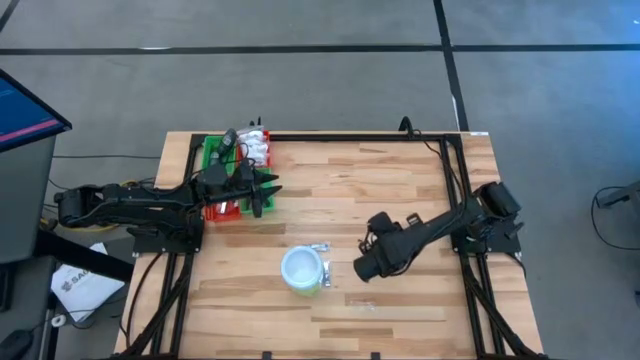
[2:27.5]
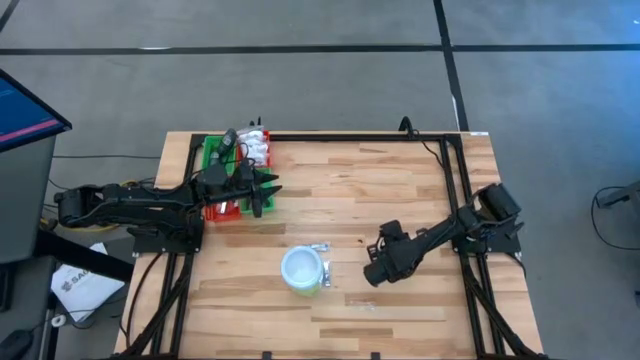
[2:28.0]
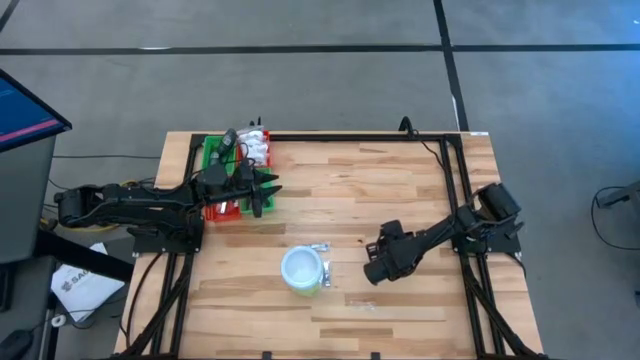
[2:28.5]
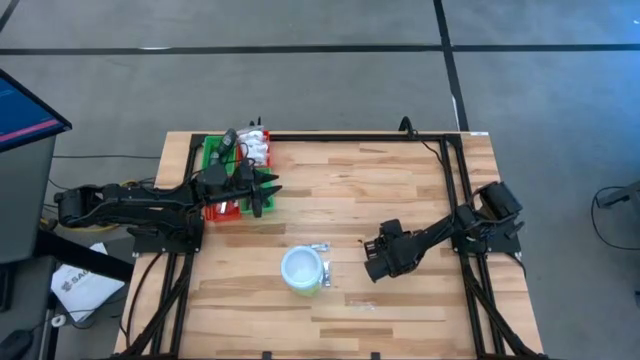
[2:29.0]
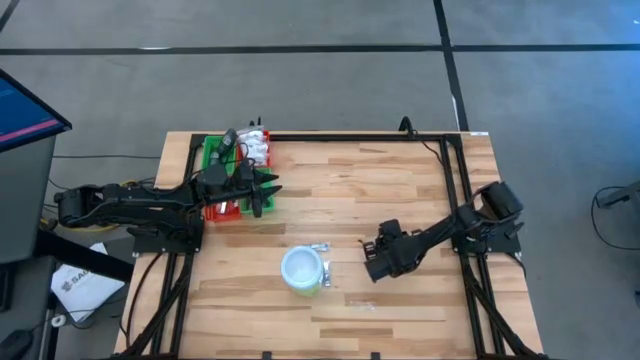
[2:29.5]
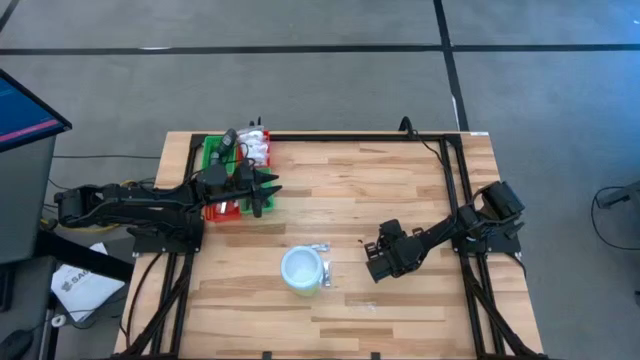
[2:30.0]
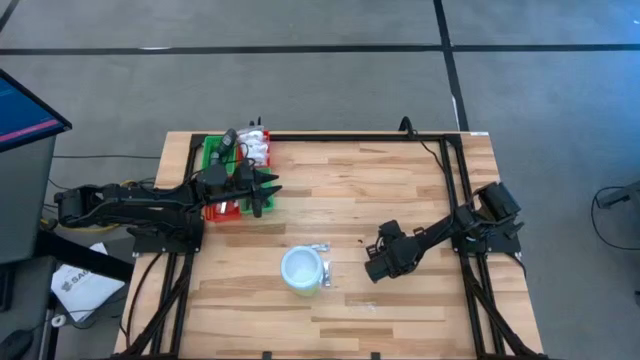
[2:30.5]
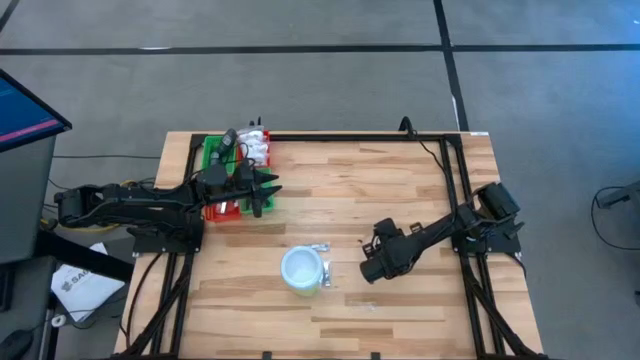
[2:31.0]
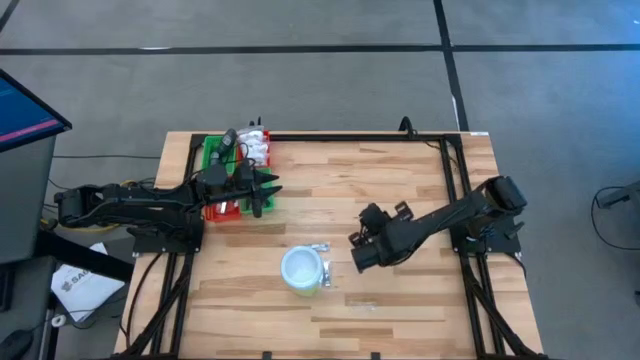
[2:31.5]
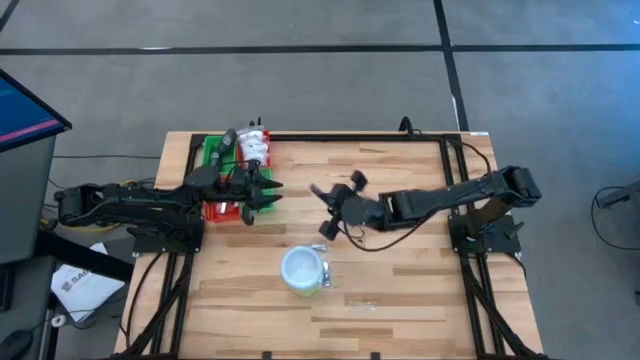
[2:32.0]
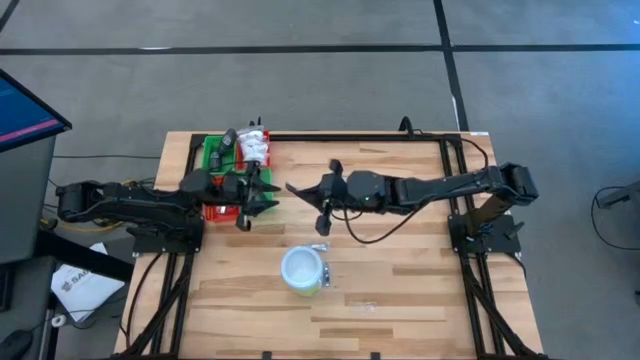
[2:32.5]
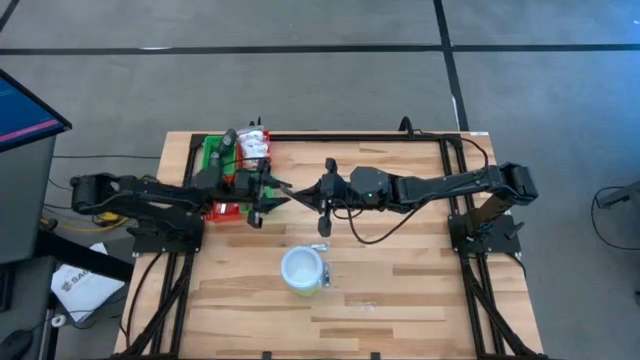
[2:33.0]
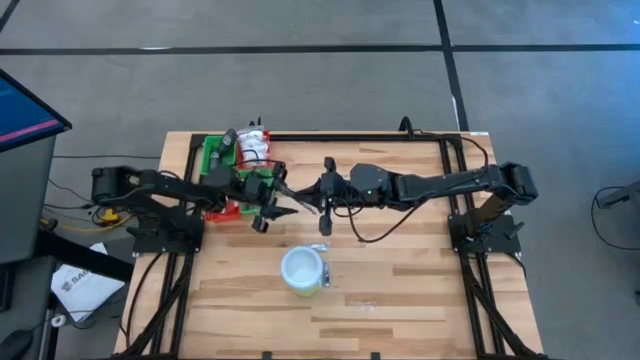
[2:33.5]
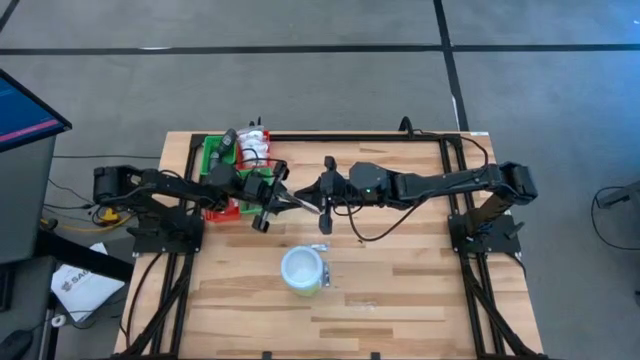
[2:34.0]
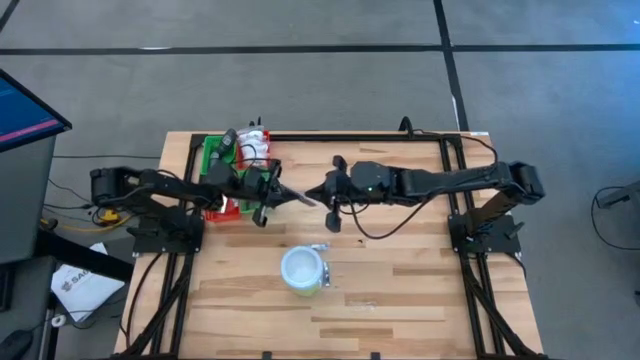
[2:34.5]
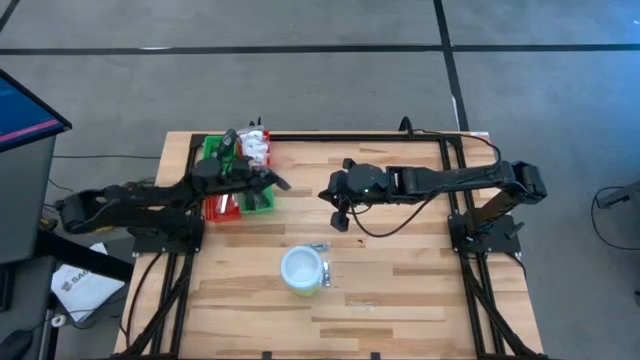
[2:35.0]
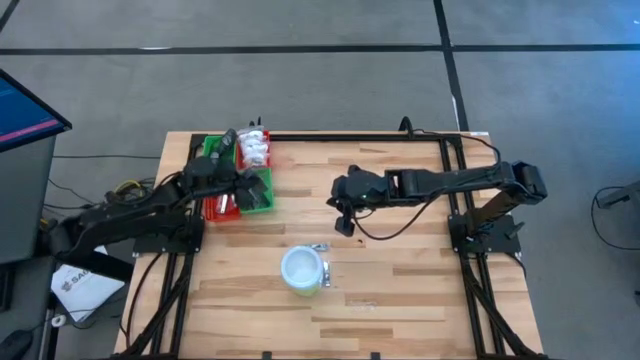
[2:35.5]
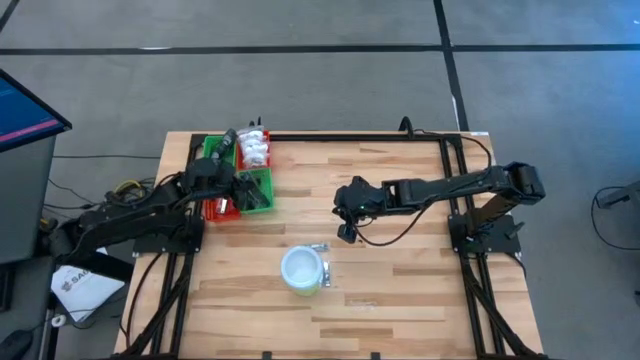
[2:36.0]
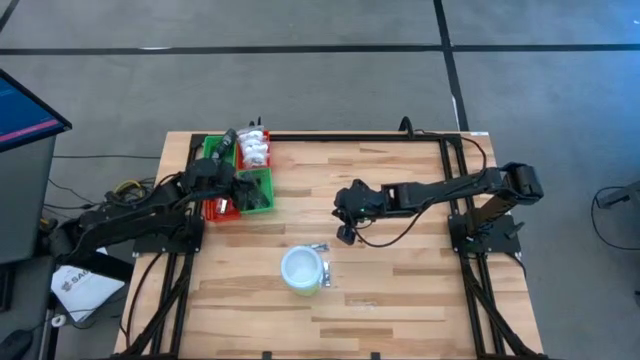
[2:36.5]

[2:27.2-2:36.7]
Task: Pick & Place Travel size toiletries
Put the black comb into the bottom green bin

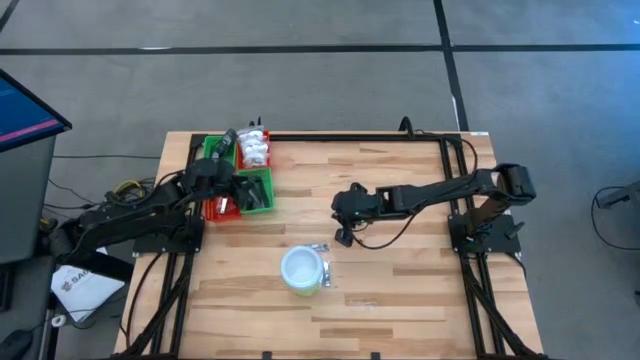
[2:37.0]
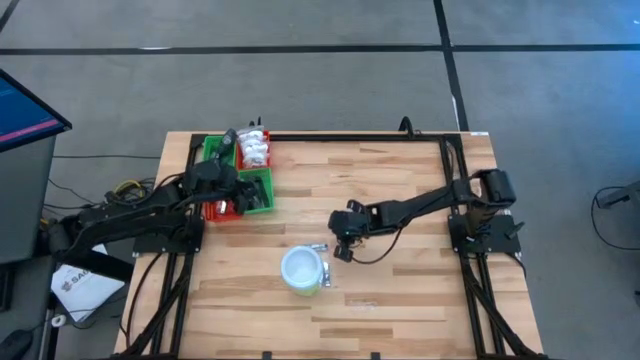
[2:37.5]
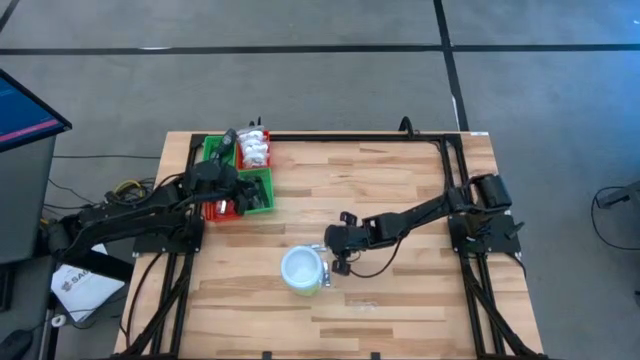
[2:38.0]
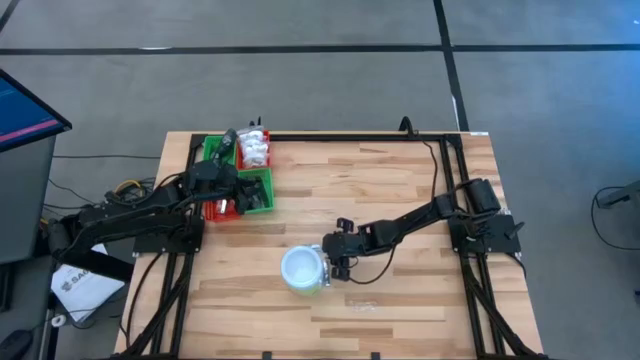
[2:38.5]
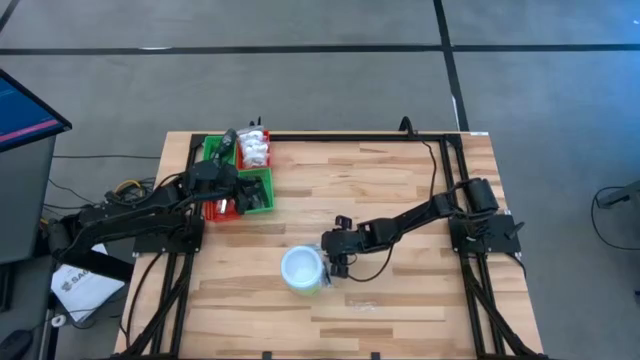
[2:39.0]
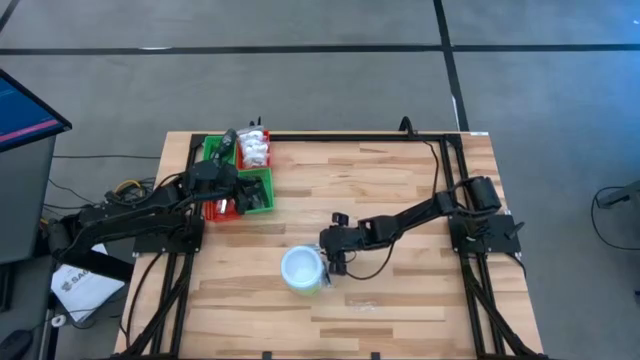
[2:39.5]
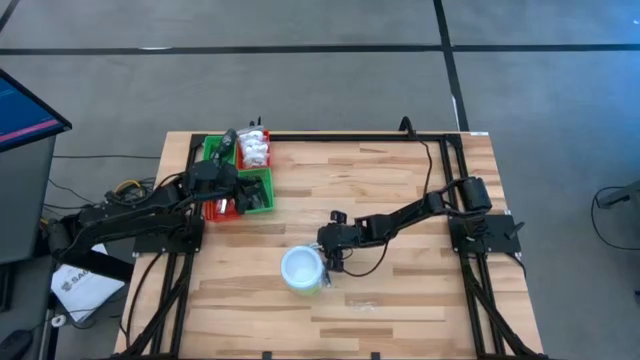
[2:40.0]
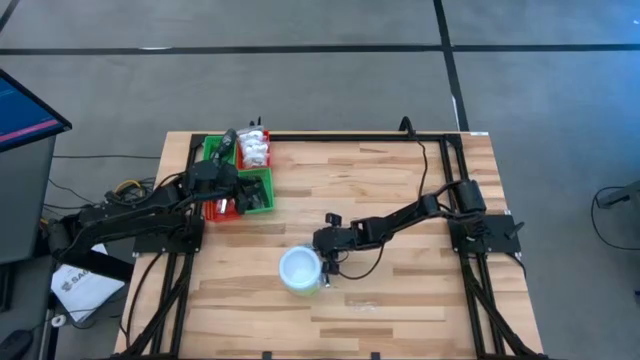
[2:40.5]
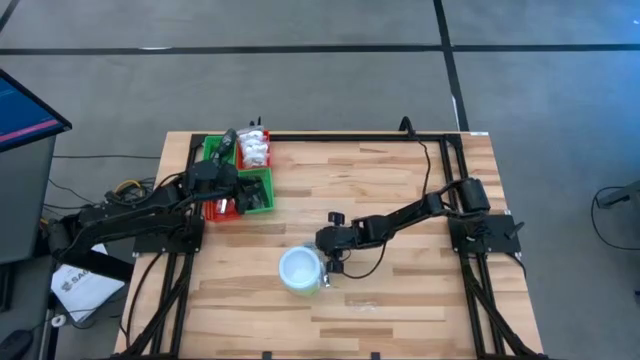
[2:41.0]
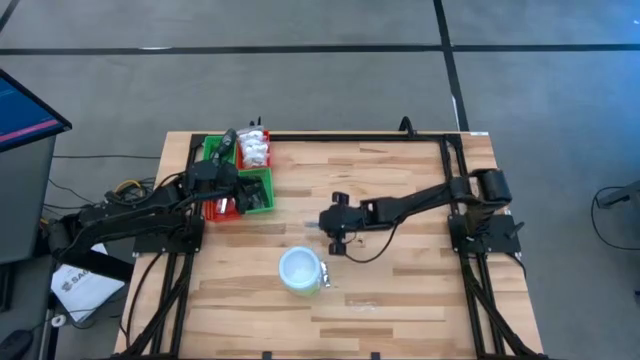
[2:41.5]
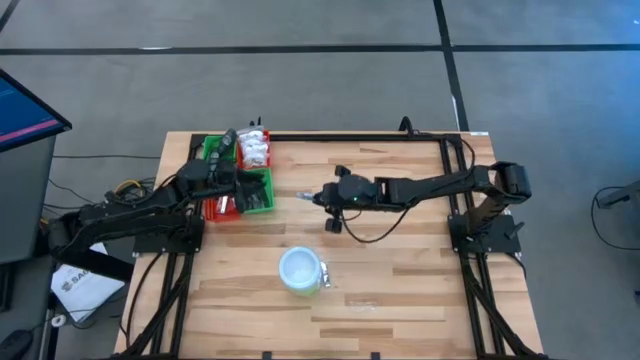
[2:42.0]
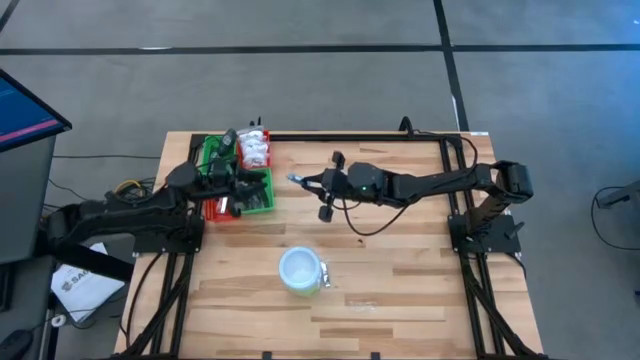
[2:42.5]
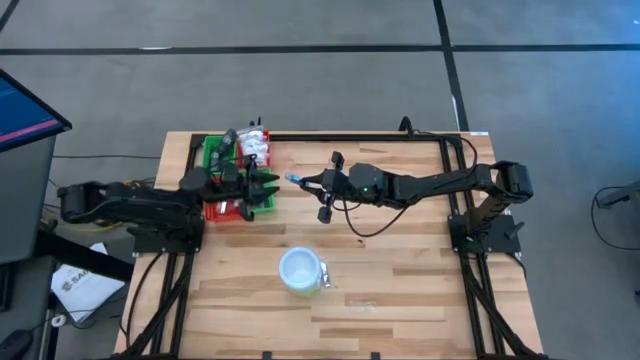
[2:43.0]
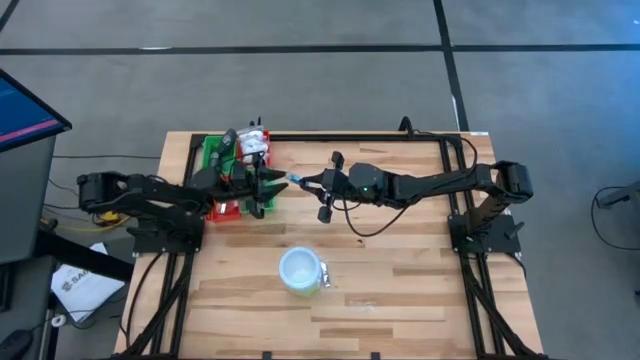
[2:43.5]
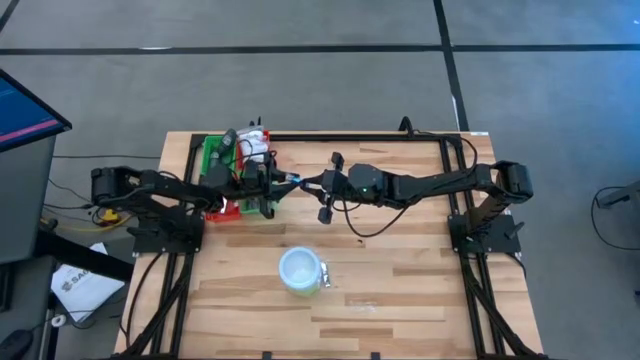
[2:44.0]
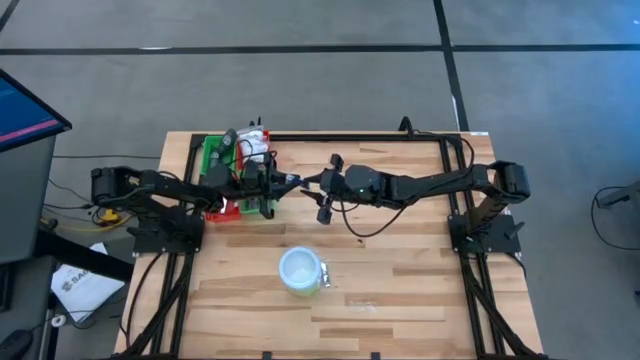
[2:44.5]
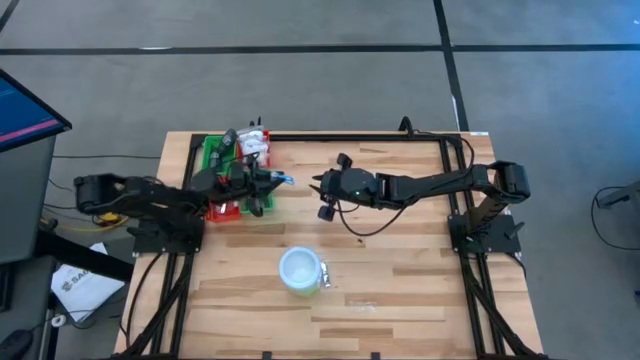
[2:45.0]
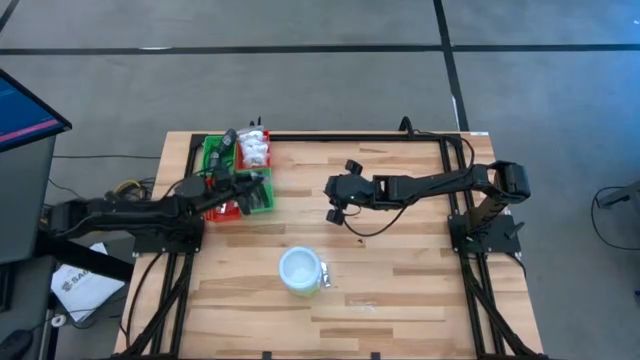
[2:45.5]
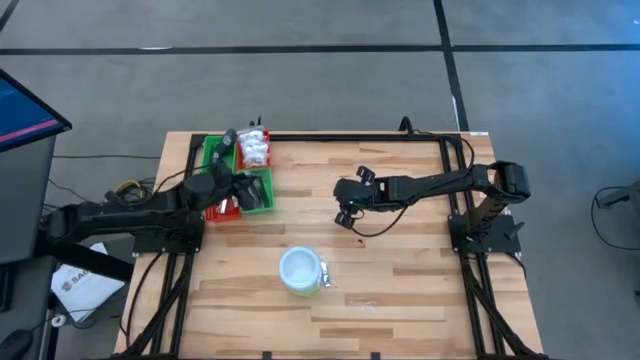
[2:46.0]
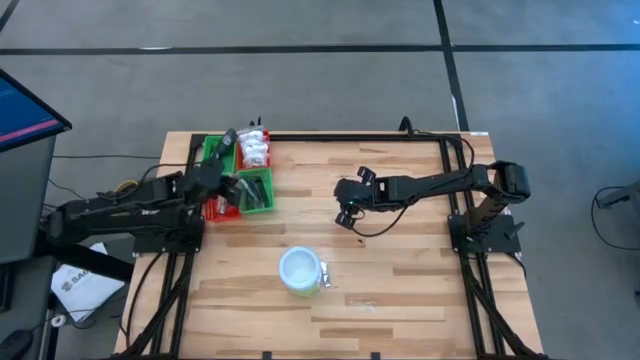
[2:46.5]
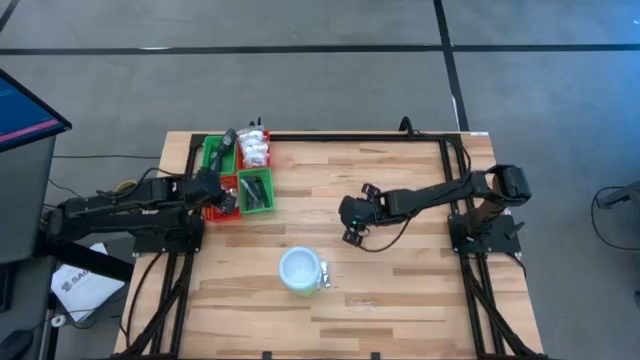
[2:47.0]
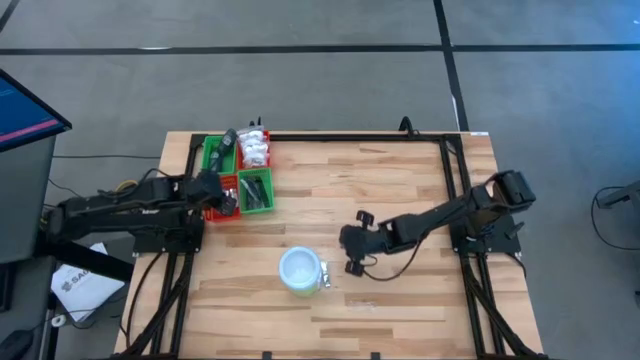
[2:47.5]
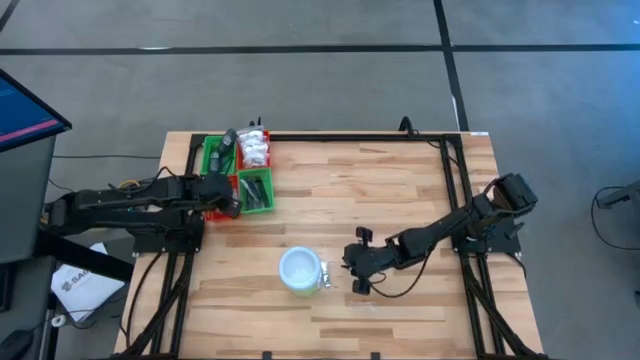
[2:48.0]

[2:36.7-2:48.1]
Put the silver nail cutter into the bottom red bin
